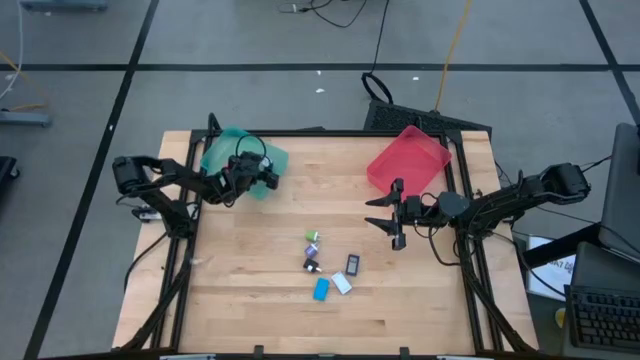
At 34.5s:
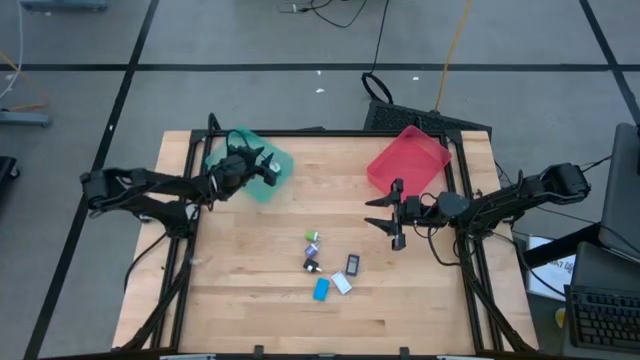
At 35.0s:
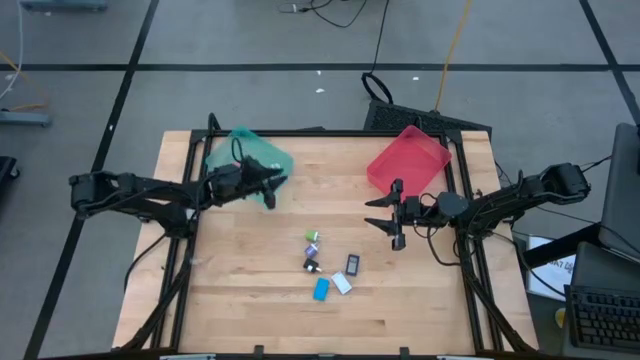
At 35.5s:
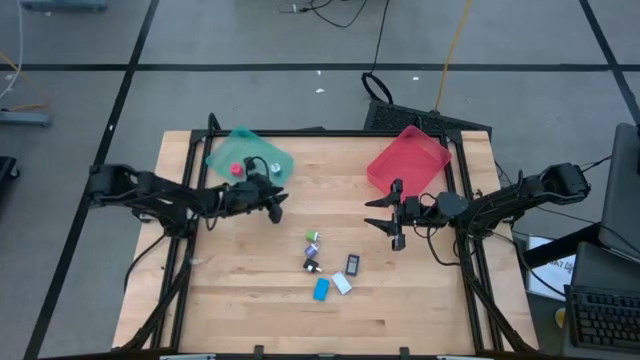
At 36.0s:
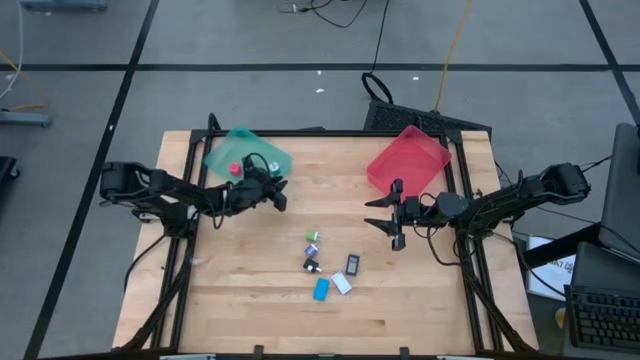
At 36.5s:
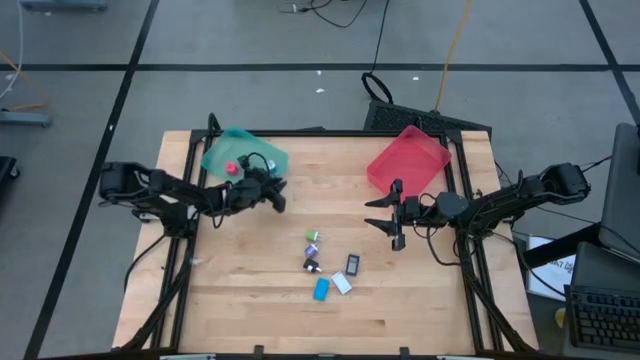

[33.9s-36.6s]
Task: Pick & Place Office items
Adjust the blue bin

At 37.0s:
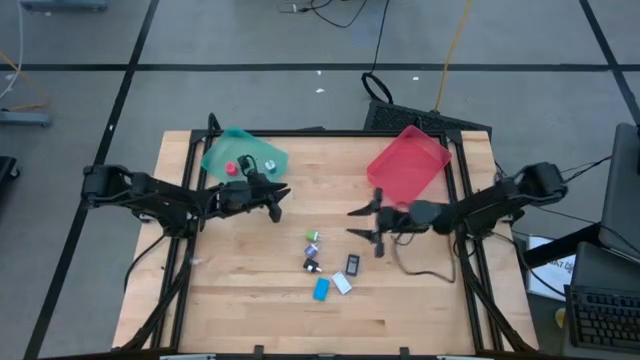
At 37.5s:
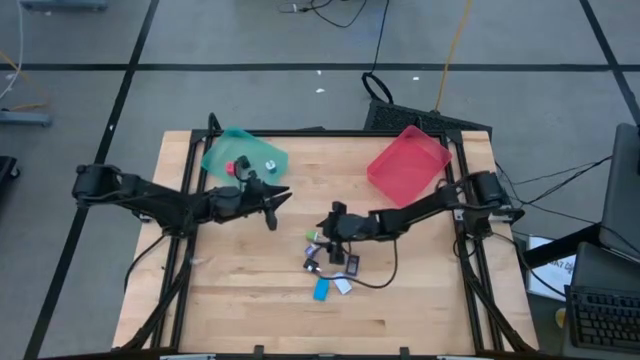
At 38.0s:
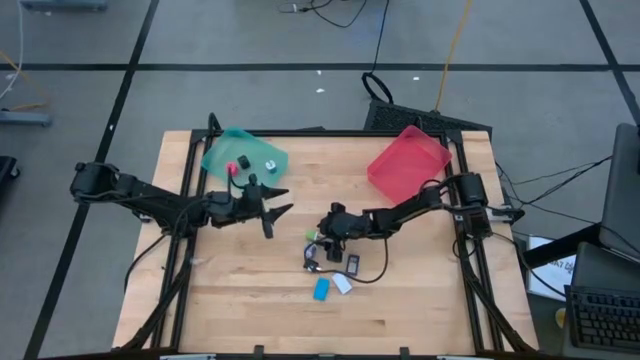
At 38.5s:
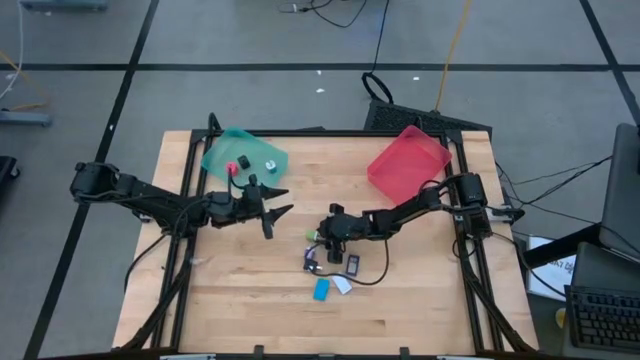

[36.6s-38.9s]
Put the green charger adapter into the blue bin

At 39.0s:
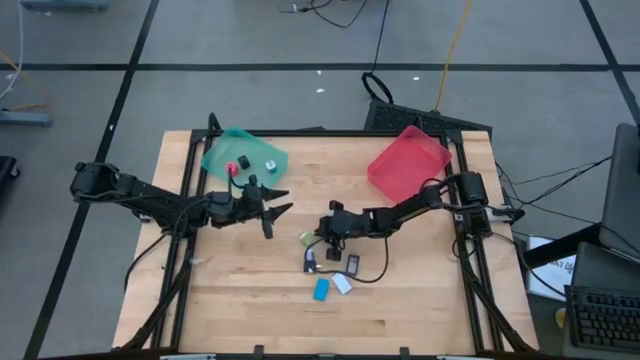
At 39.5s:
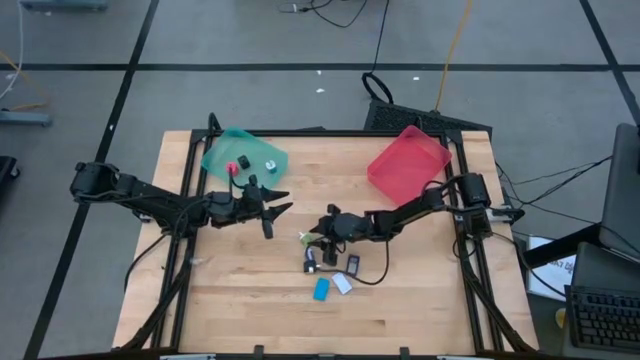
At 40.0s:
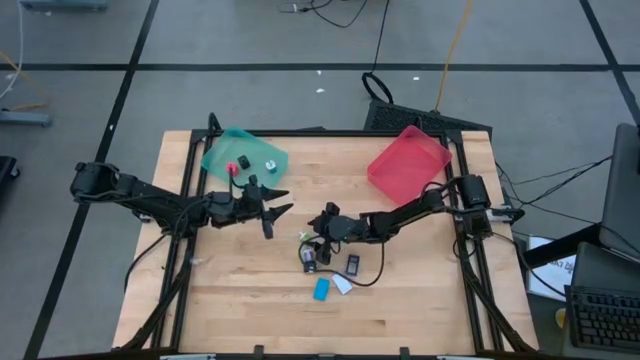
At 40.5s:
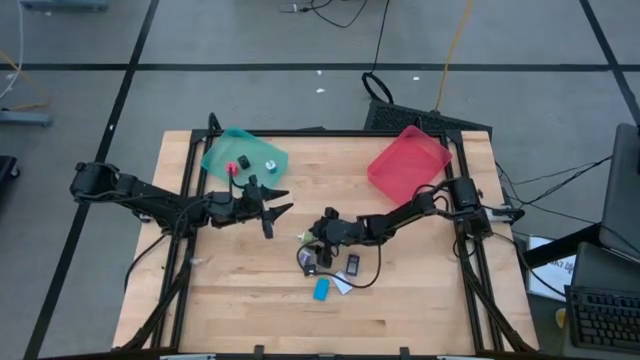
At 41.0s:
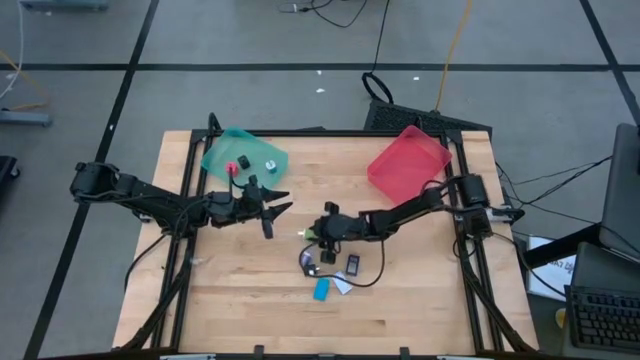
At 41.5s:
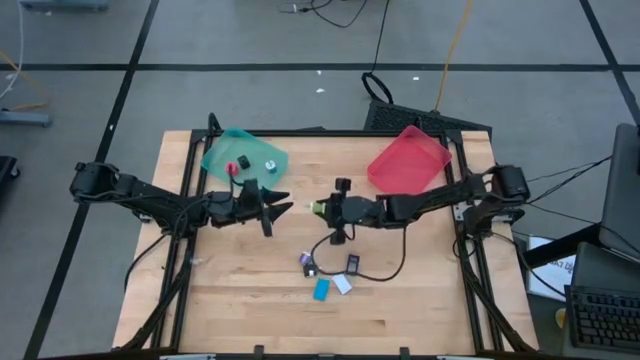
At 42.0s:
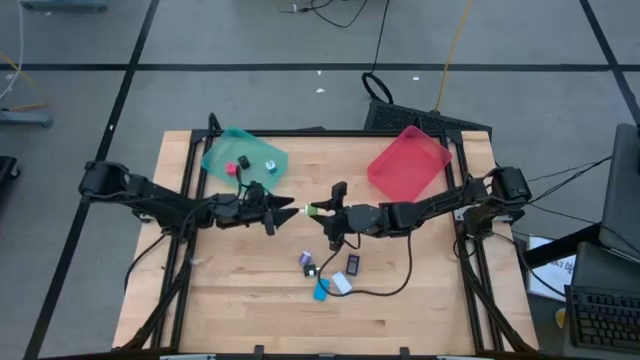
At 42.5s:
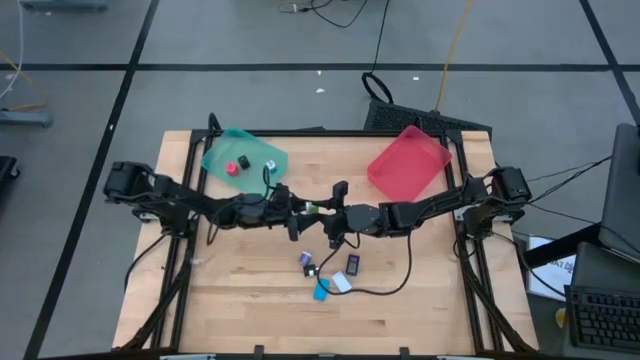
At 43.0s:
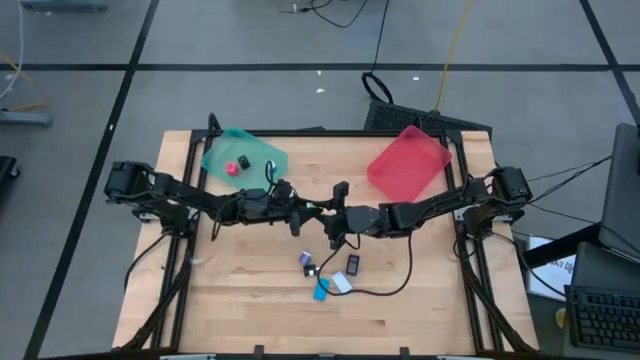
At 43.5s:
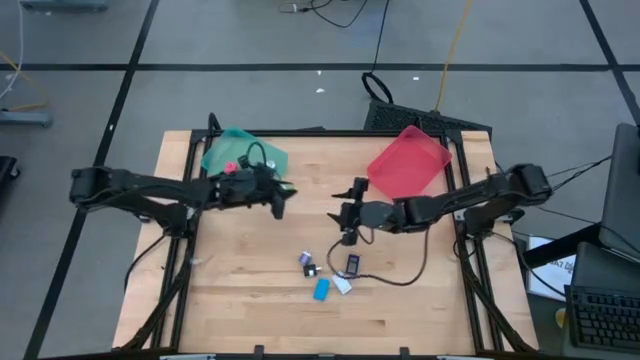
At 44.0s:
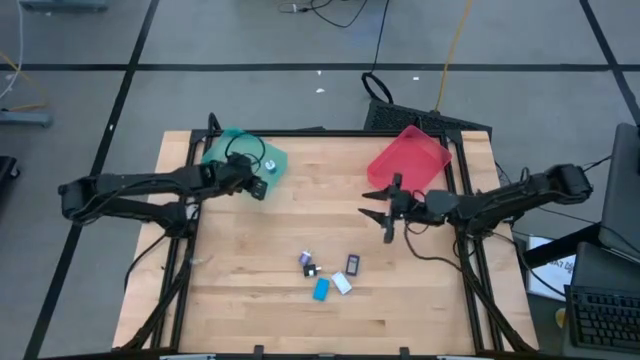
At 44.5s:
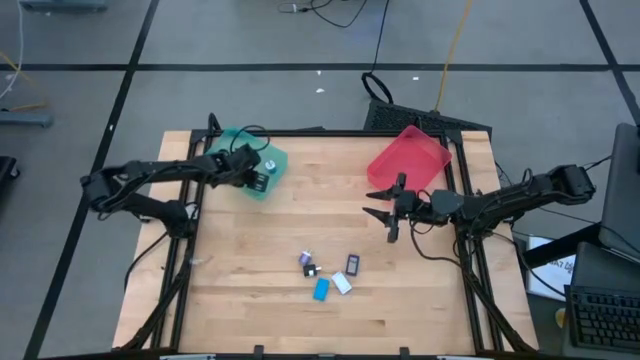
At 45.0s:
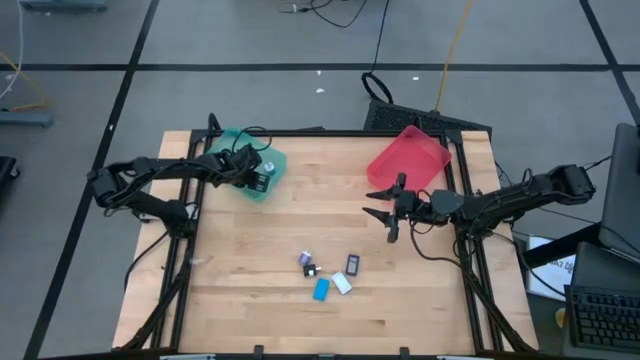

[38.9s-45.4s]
Put the green charger adapter into the blue bin

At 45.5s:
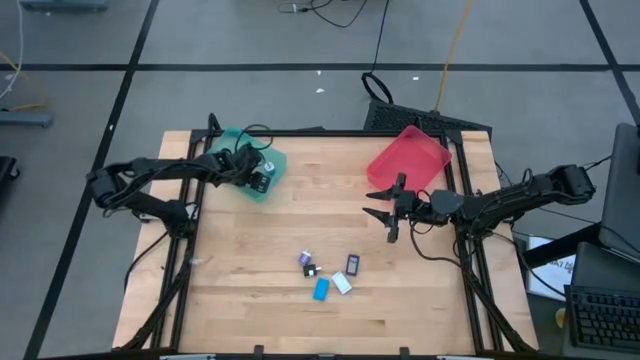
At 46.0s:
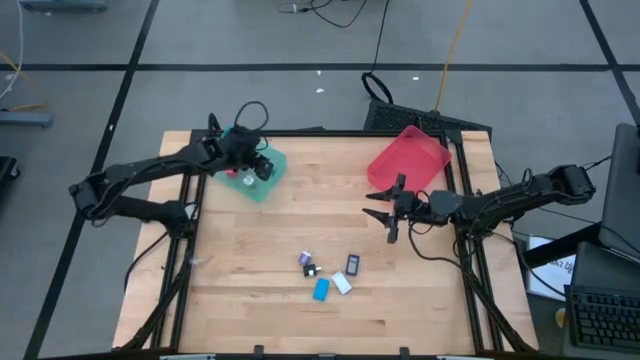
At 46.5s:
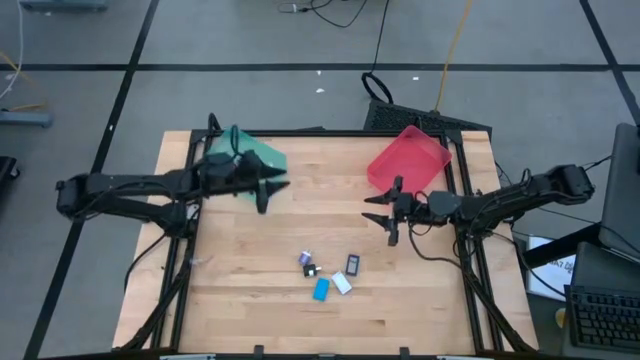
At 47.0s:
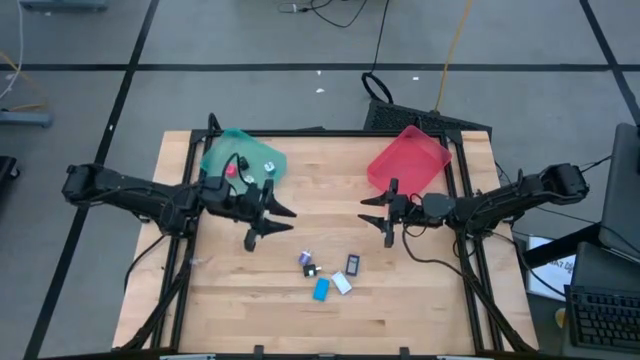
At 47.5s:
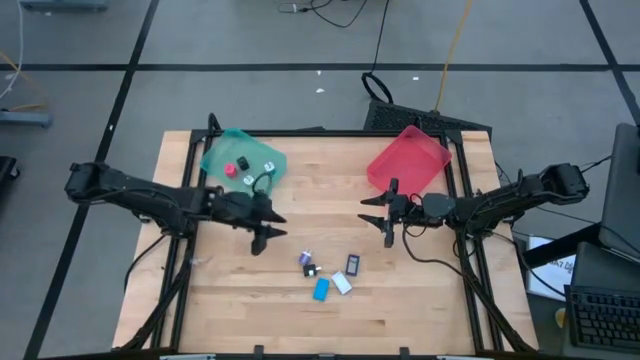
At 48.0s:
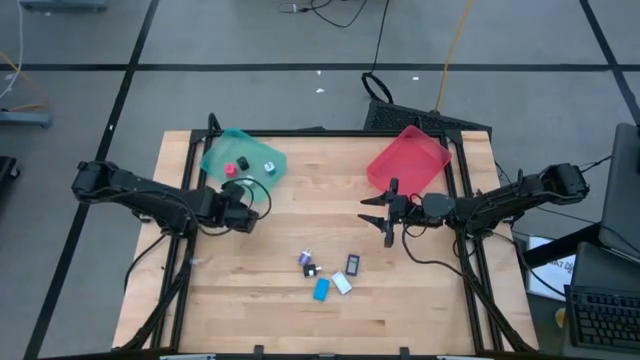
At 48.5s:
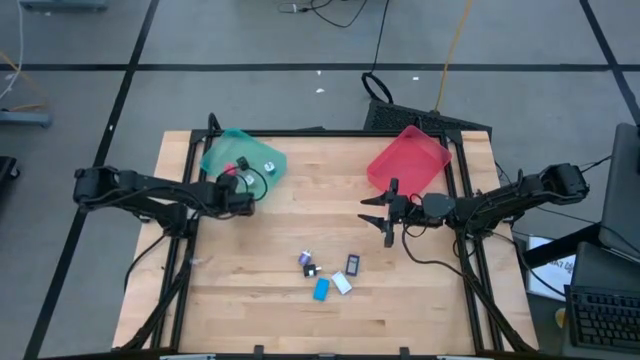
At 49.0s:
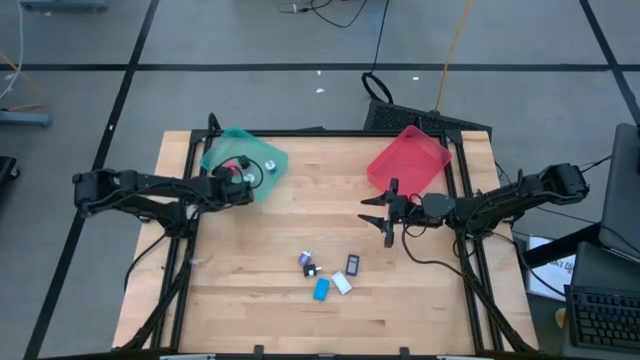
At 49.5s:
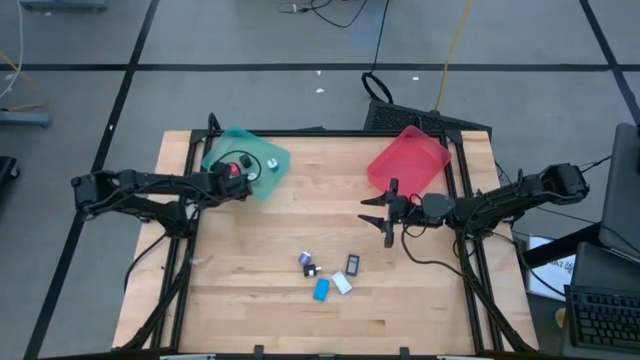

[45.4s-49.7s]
Adjust the blue bin

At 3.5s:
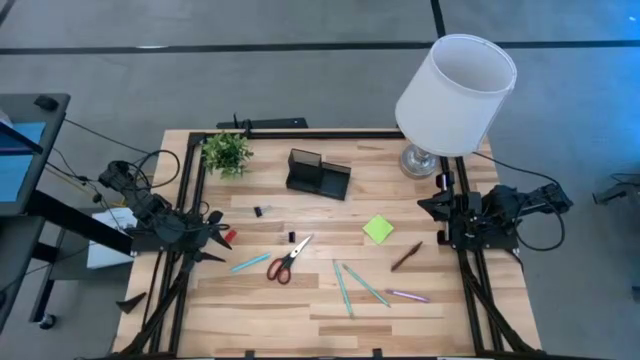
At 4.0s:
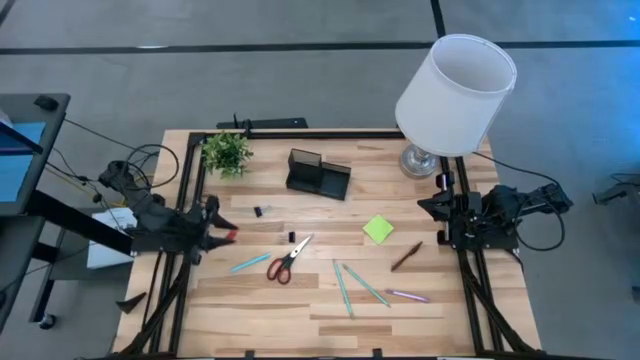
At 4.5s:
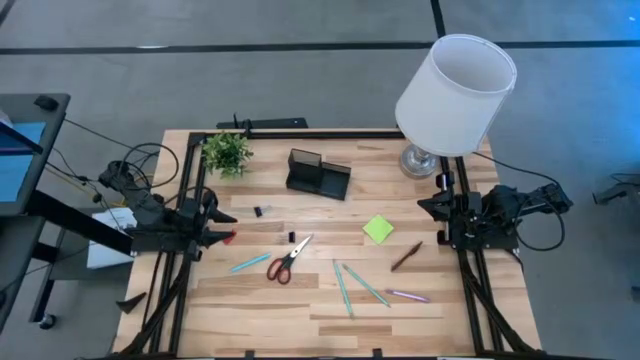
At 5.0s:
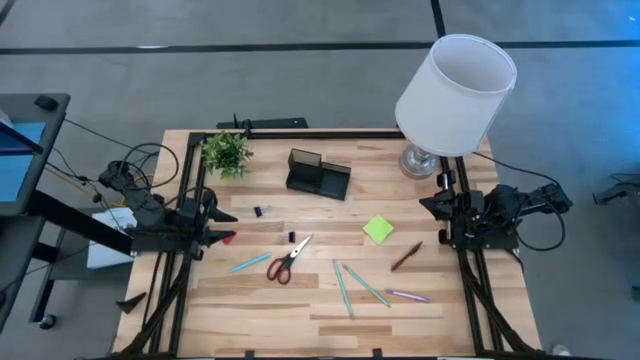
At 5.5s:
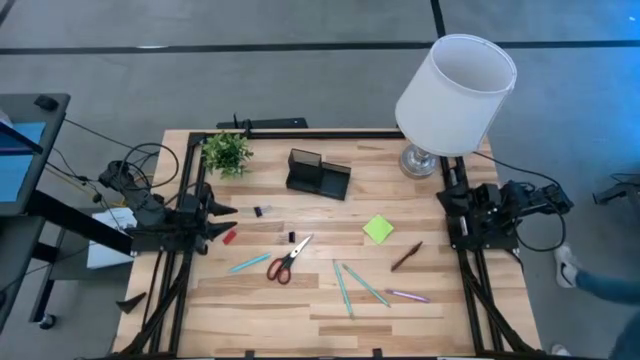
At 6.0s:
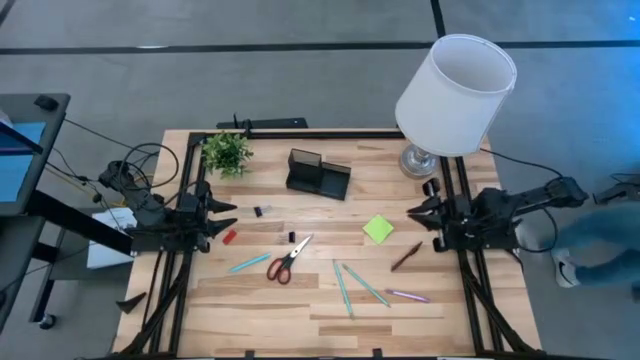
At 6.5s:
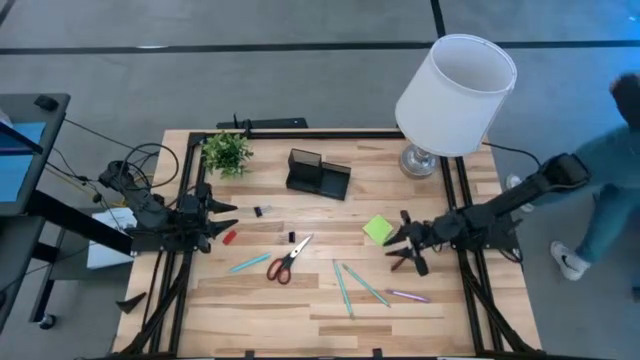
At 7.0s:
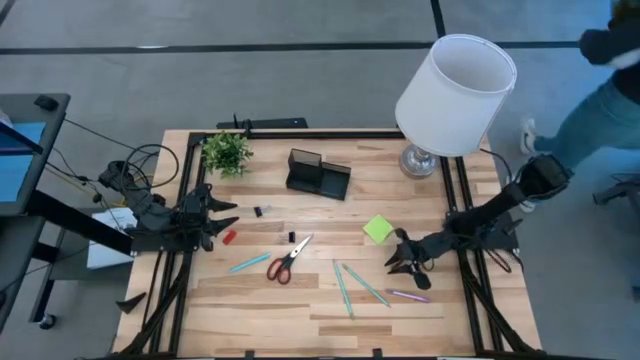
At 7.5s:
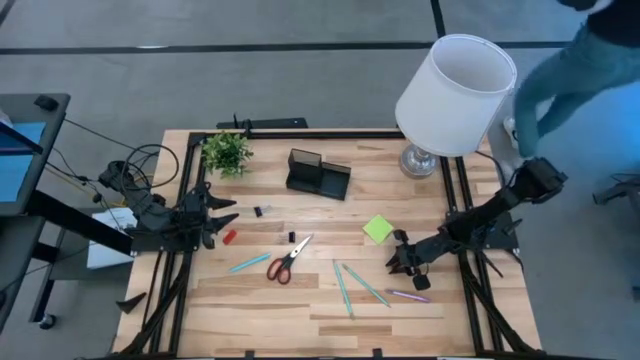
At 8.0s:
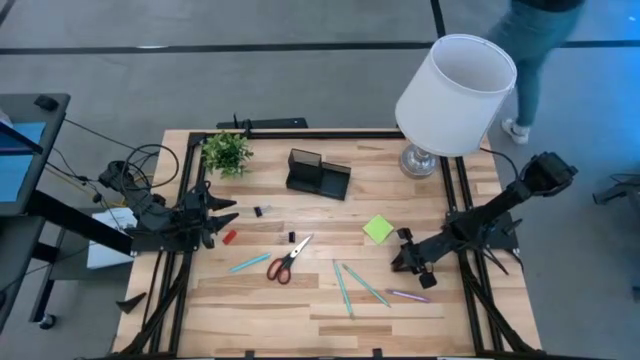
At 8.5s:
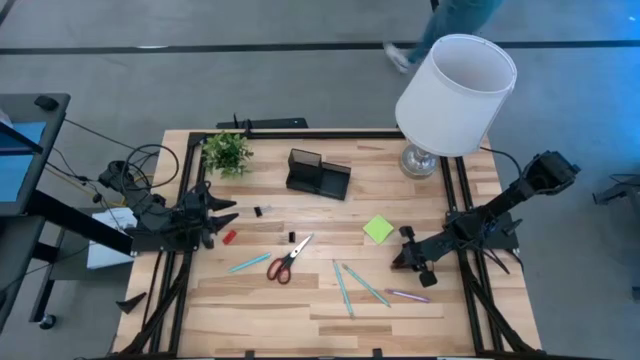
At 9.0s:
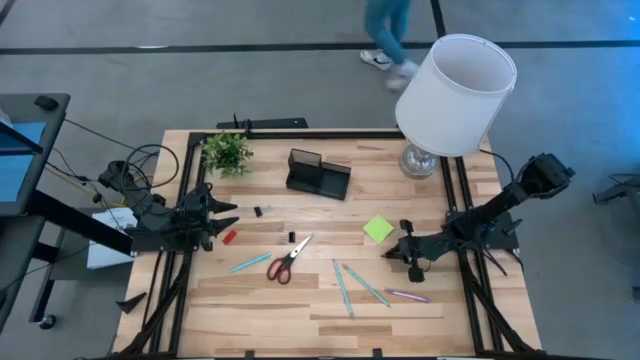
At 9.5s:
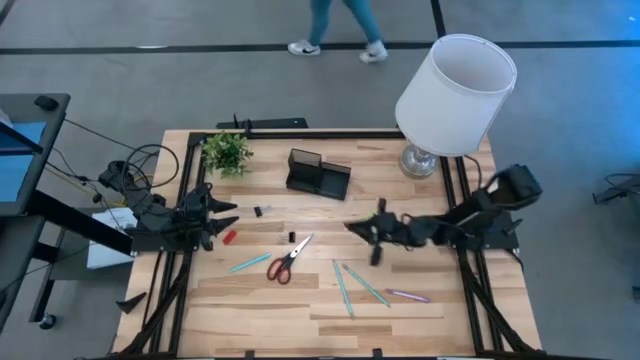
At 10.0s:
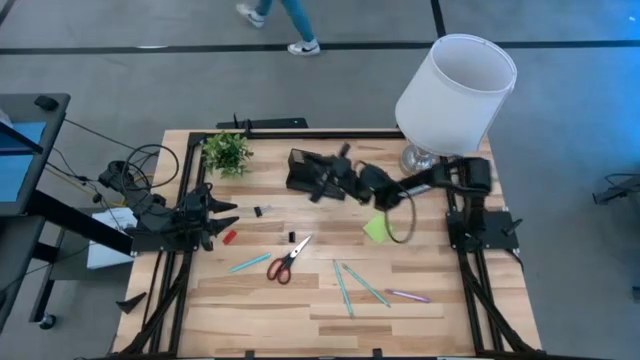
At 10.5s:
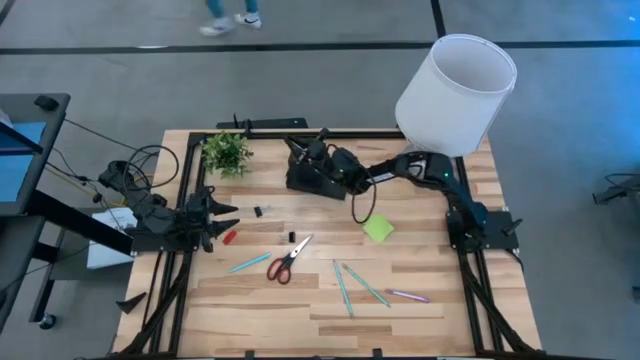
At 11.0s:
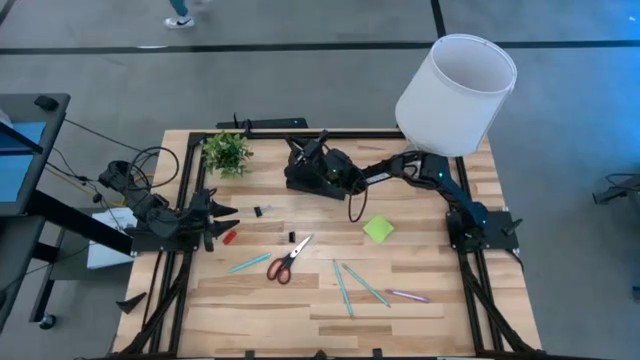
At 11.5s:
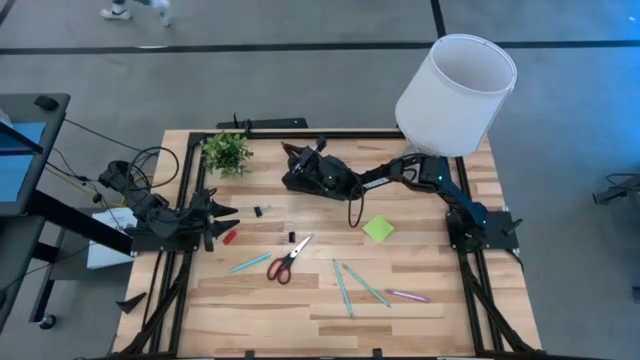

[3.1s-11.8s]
Task: Pick and place office supplies into organizer
Put the brown pen into the desk organizer
